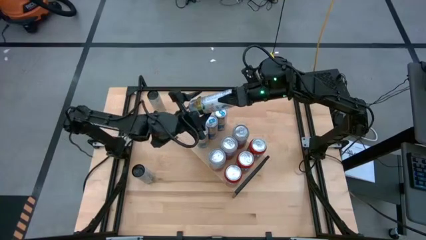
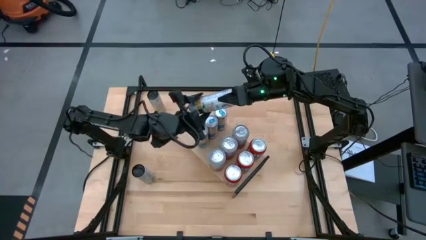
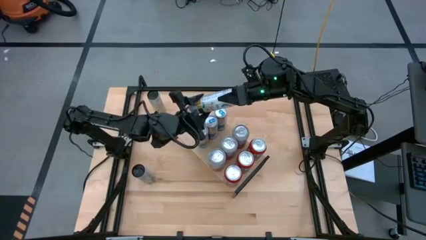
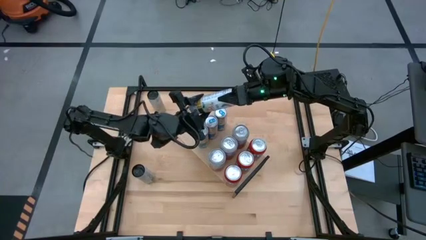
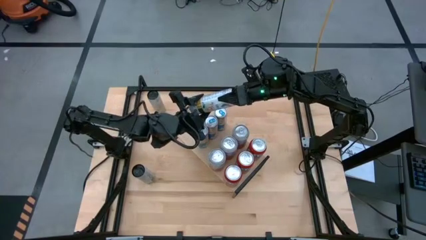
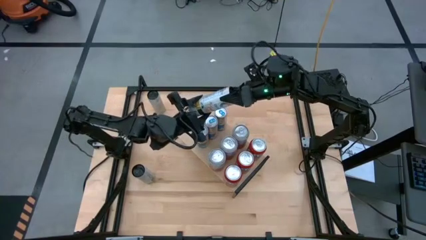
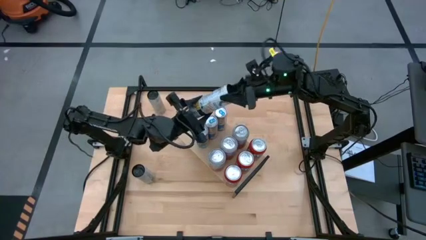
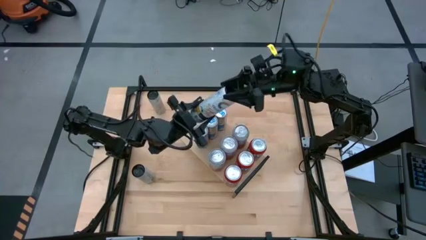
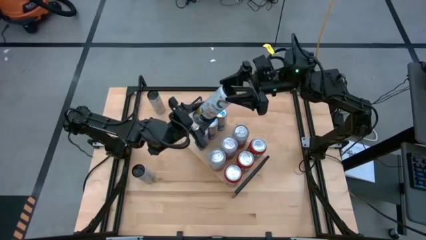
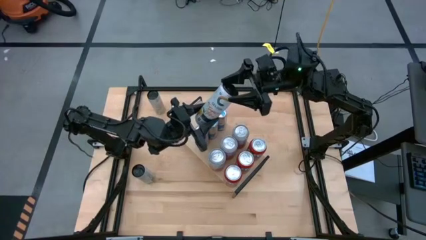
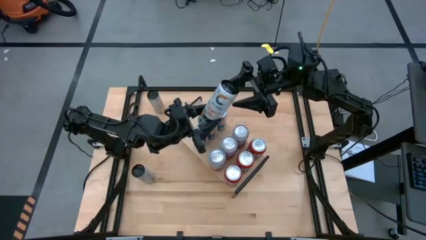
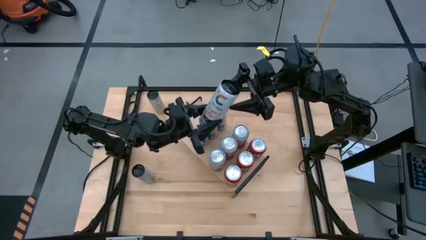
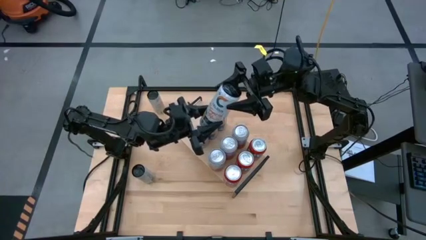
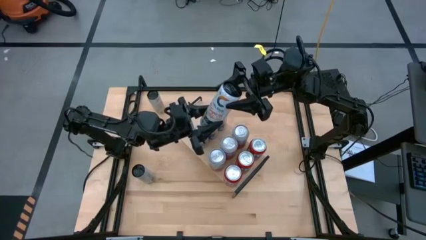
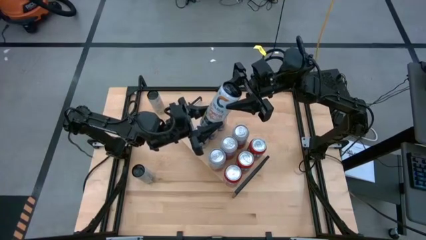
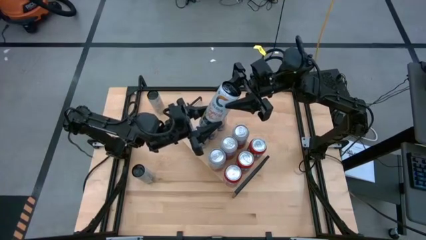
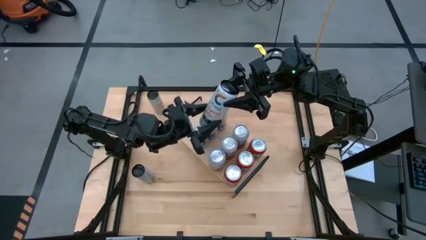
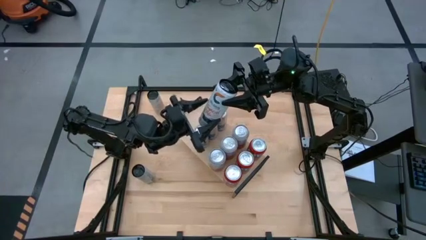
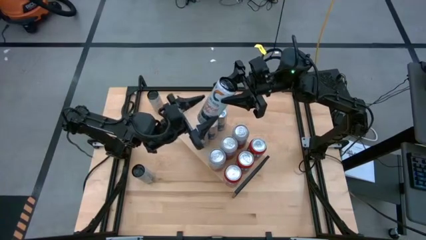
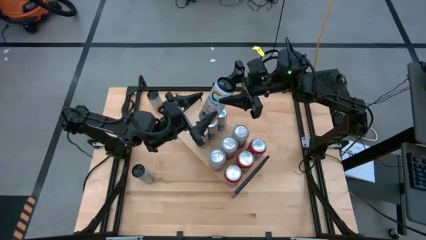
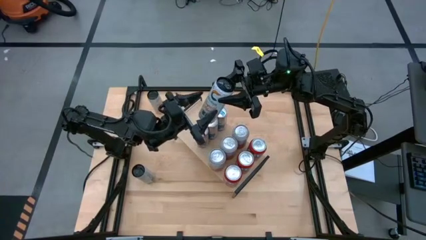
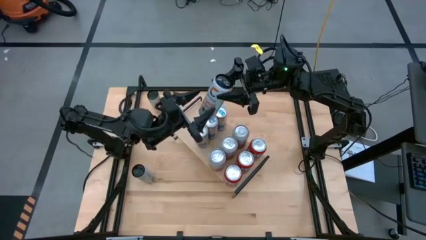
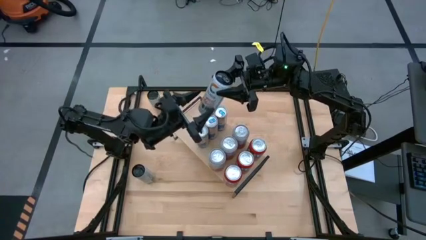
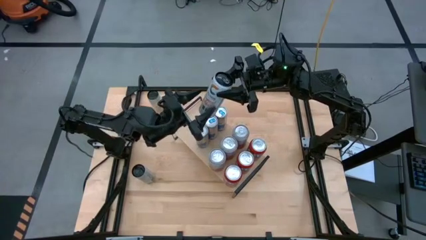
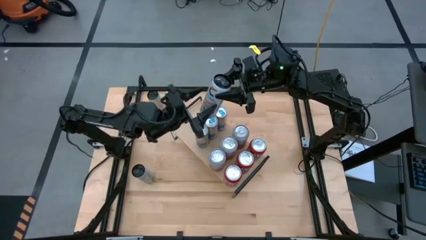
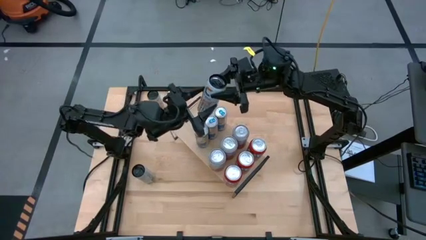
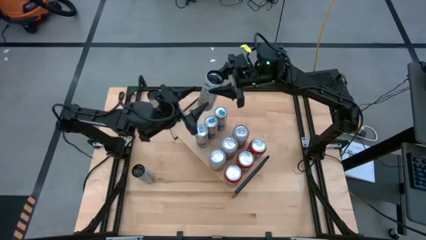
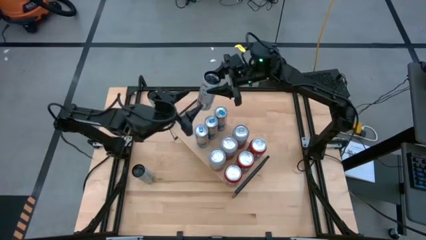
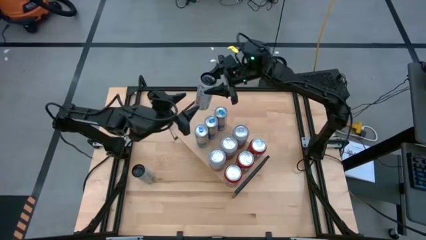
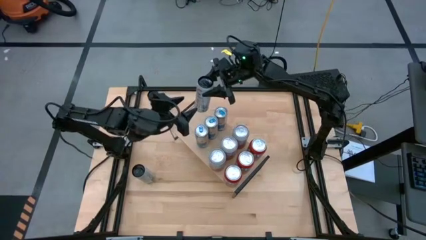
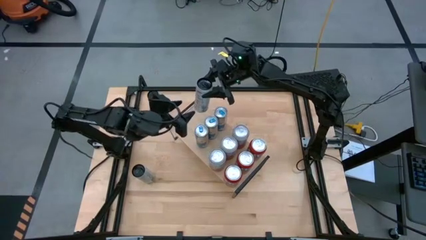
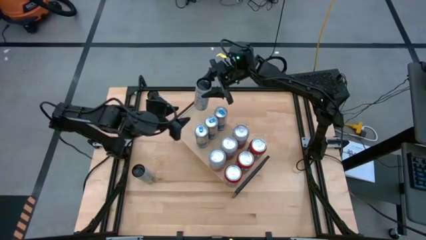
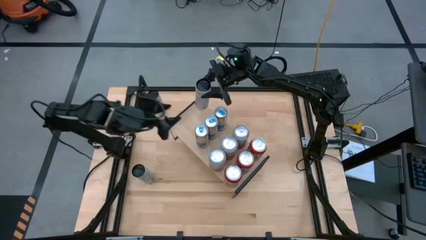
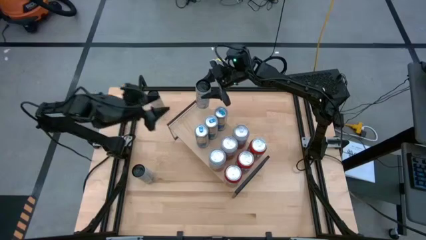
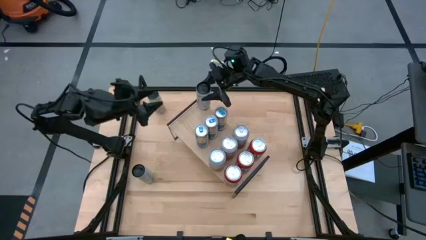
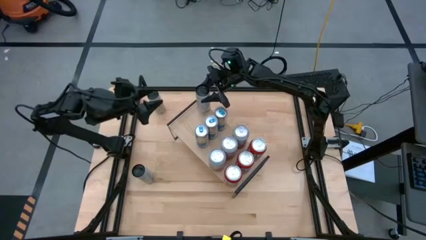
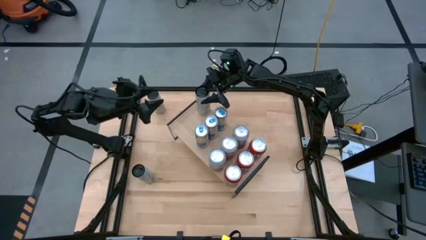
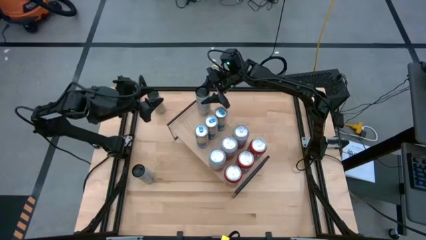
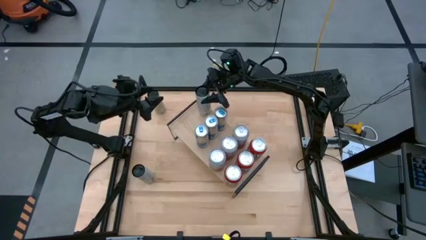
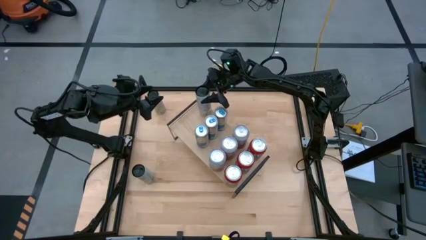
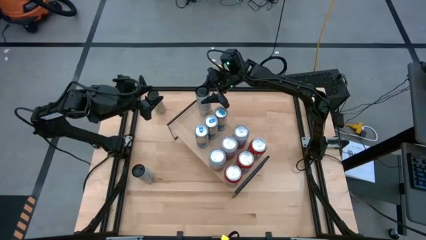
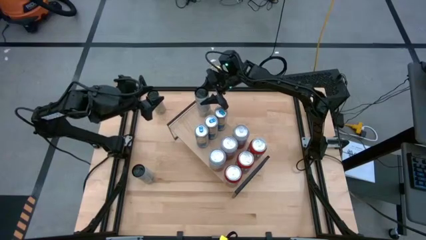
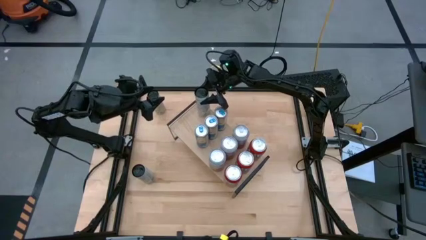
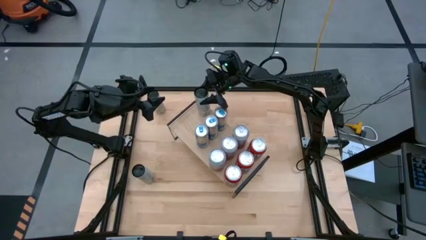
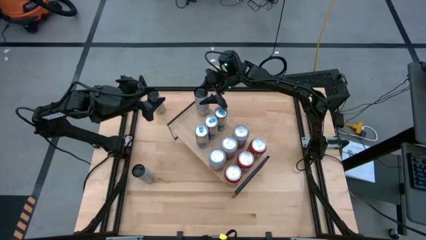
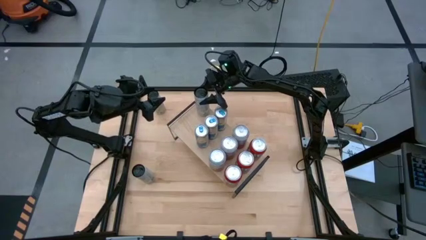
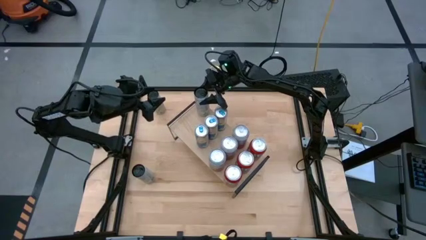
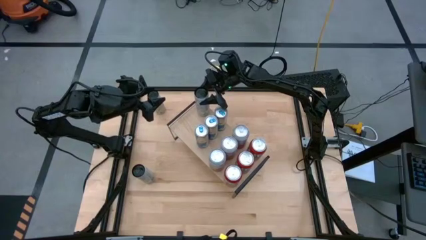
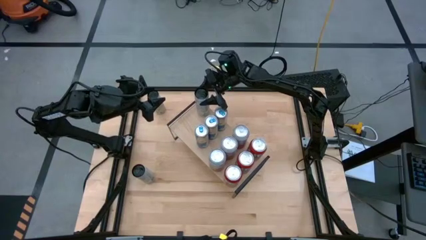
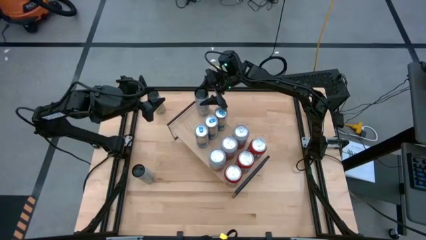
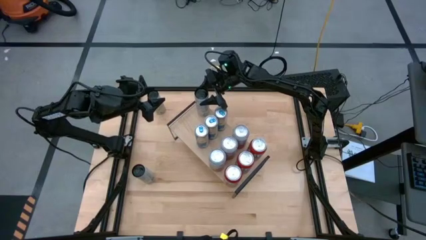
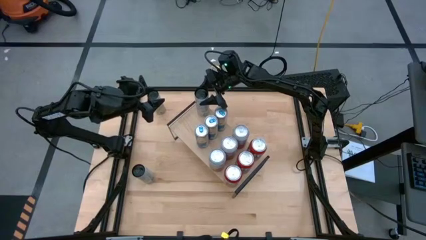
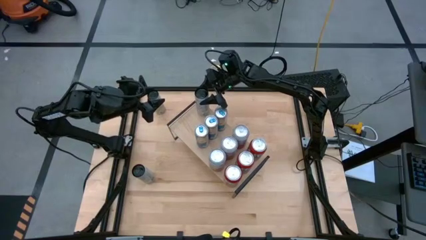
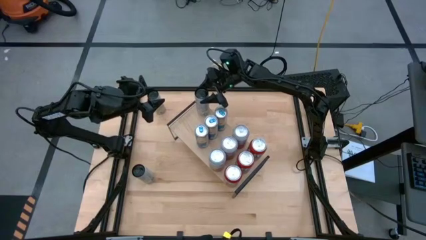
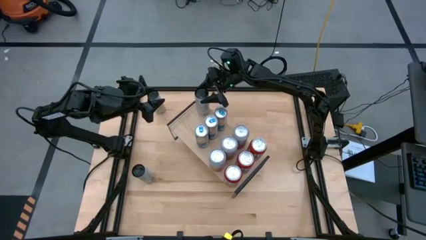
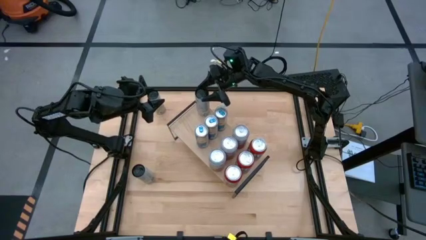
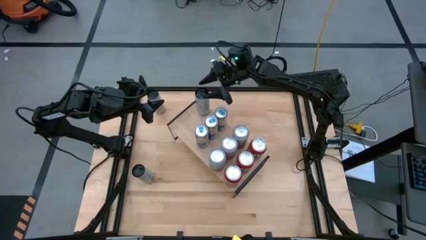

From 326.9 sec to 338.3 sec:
Task: Place canned beverage on shelf
Put the bottom right white yellow soda can on the shelf

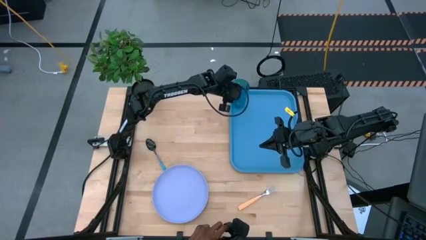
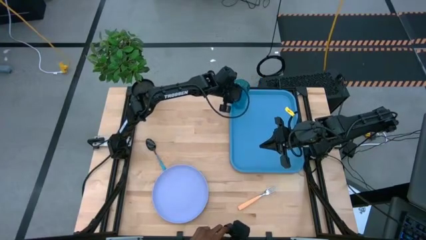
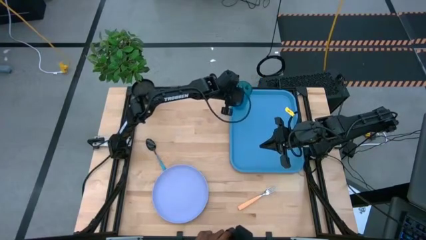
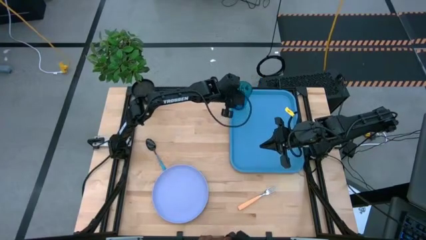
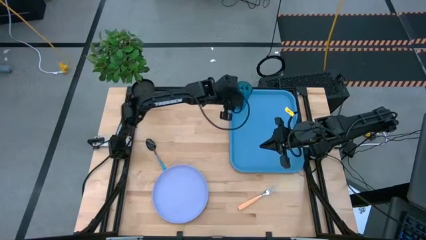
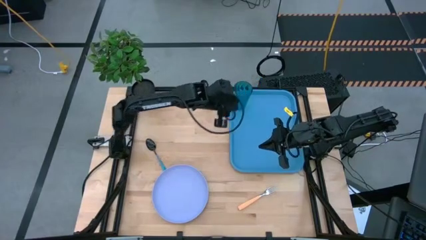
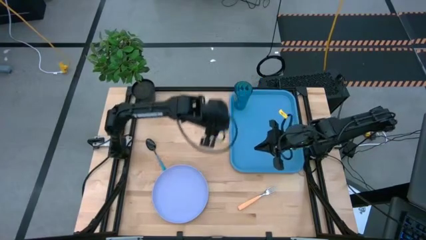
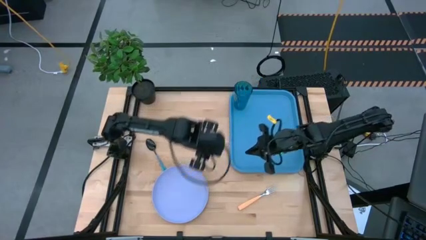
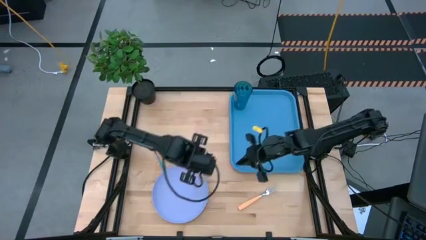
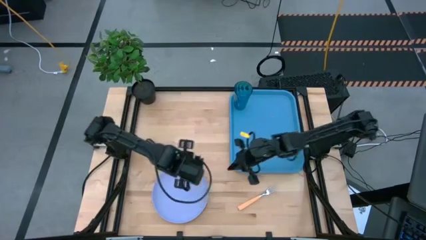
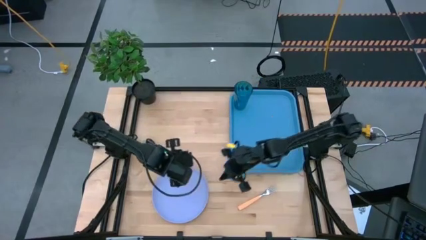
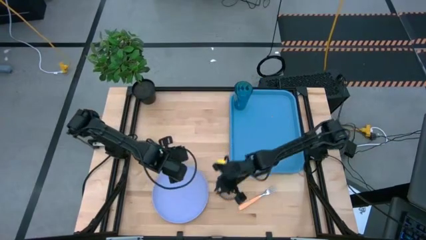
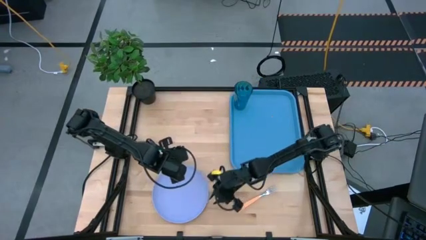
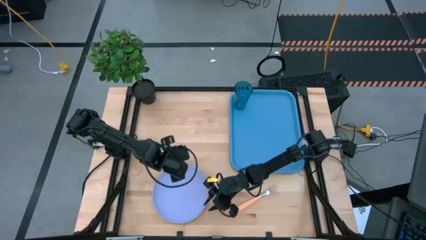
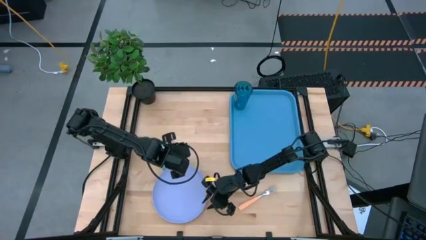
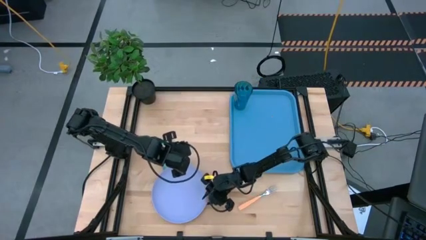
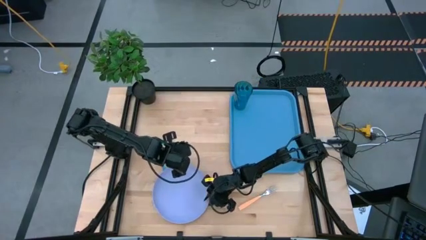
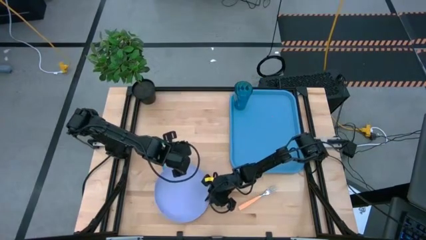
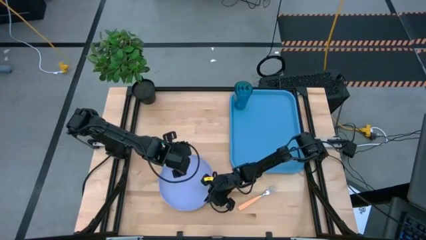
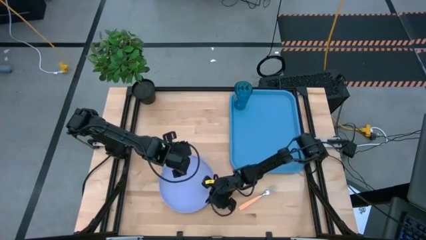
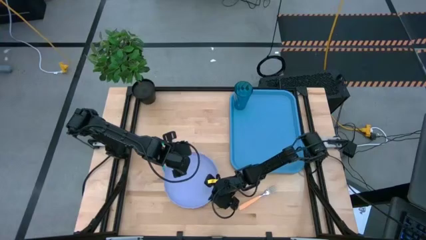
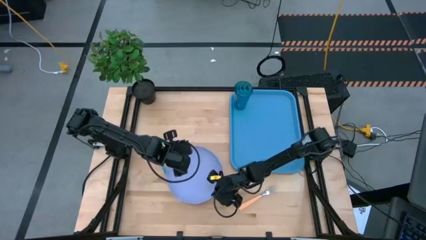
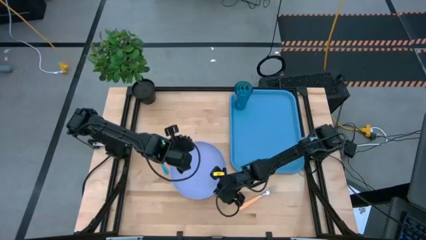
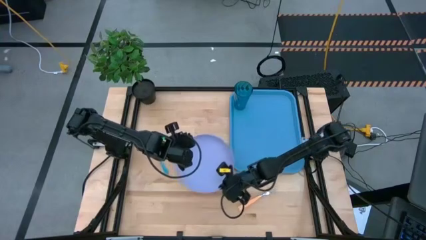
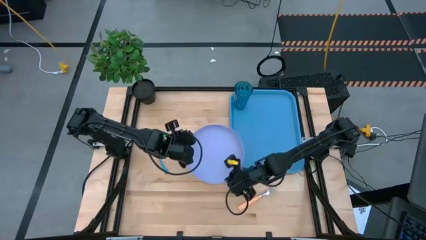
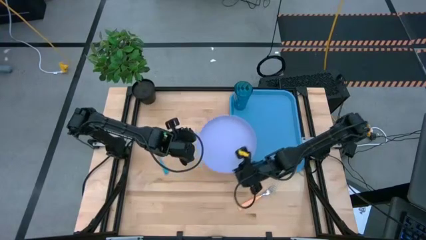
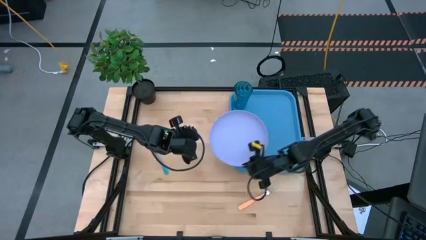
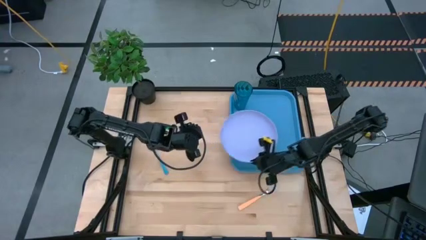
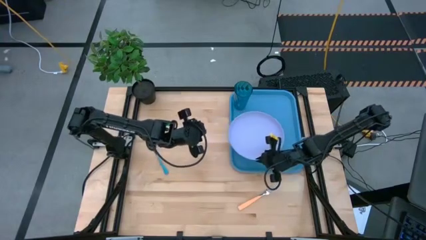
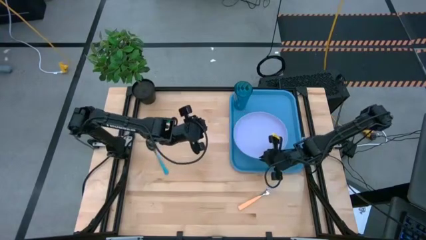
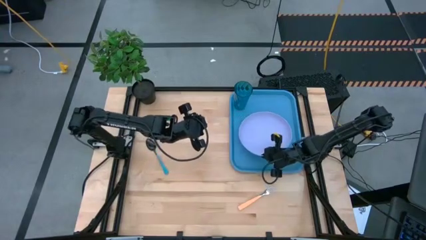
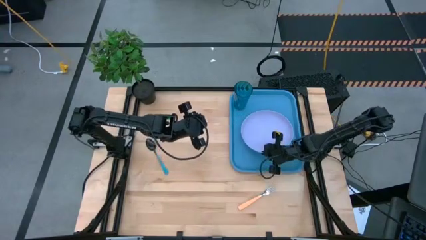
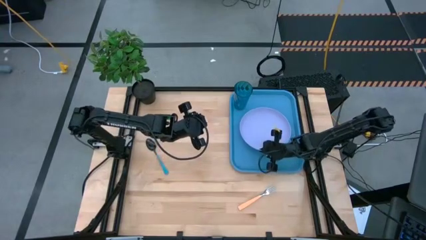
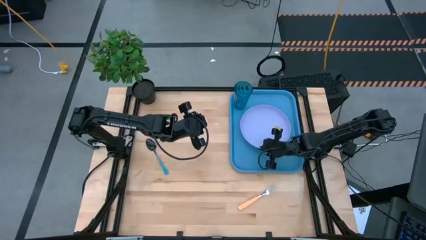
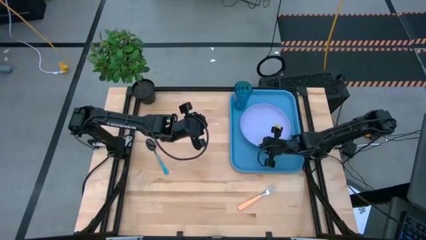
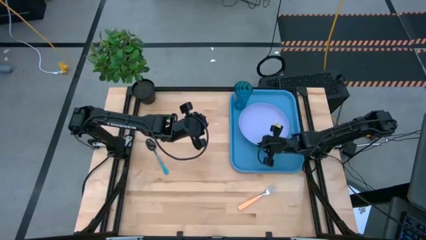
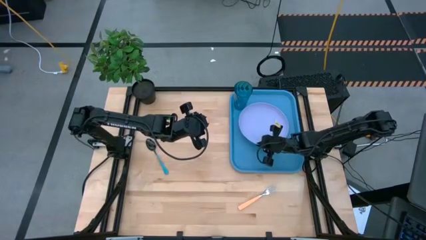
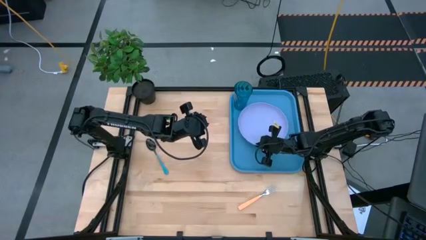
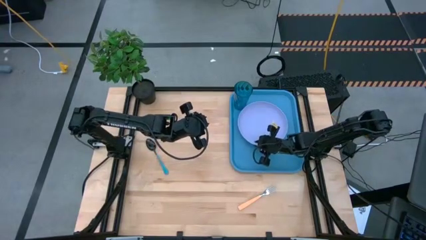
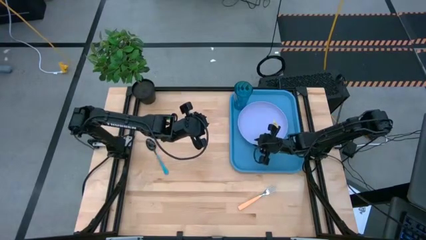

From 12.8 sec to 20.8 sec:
Task: Pick and place plate/cup/fork/spoon on tray
Put the purple plate on the blue table tray under the blue transparent cup
